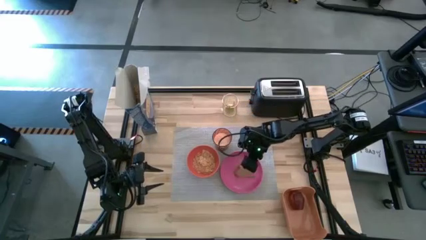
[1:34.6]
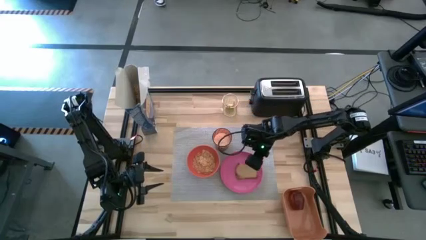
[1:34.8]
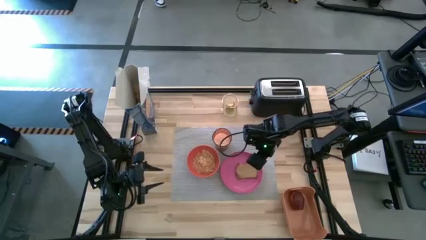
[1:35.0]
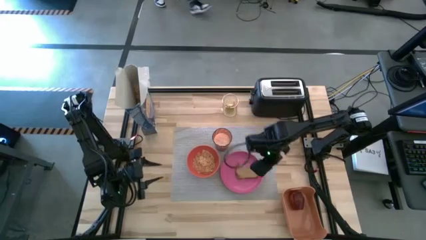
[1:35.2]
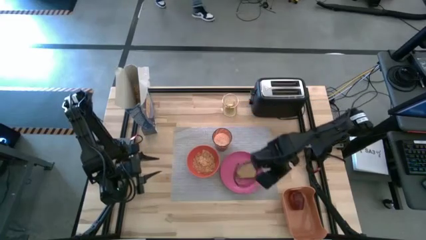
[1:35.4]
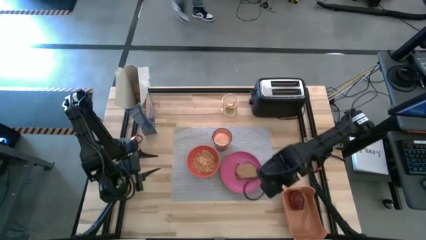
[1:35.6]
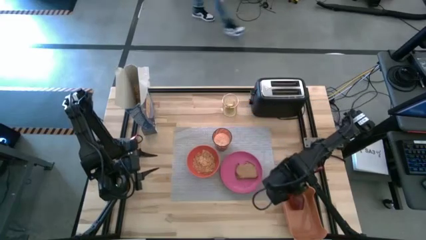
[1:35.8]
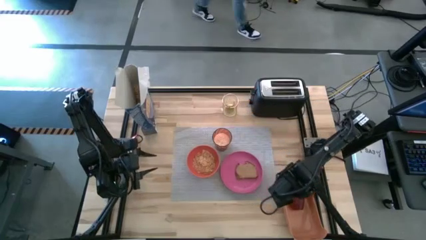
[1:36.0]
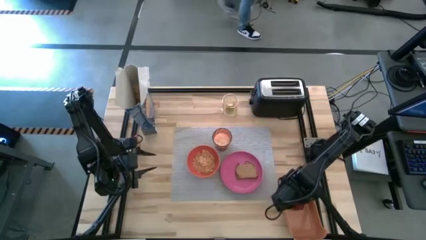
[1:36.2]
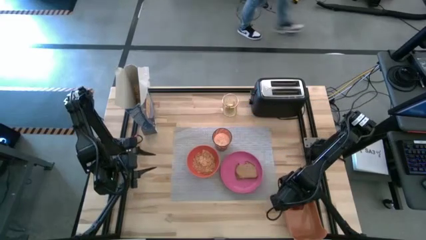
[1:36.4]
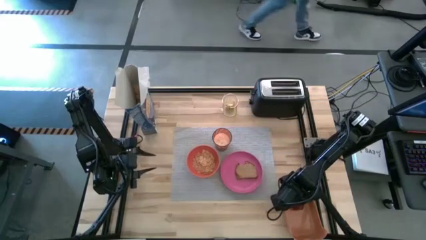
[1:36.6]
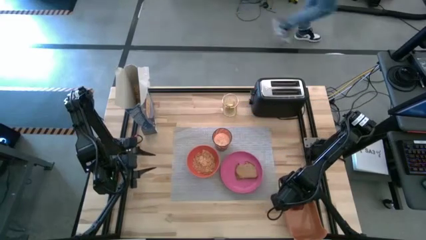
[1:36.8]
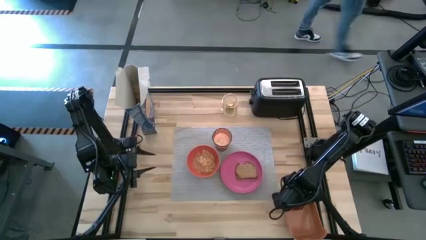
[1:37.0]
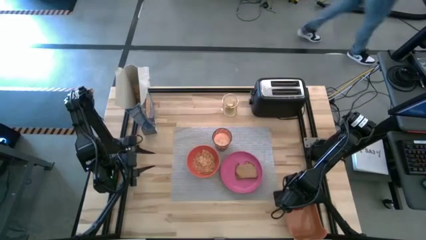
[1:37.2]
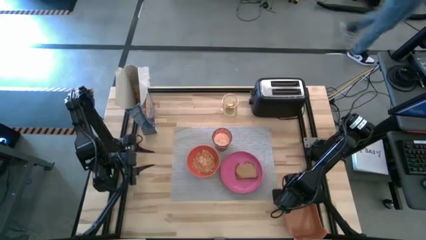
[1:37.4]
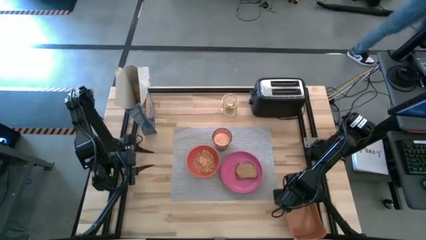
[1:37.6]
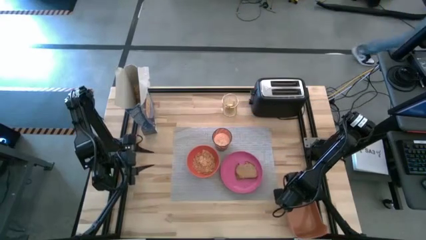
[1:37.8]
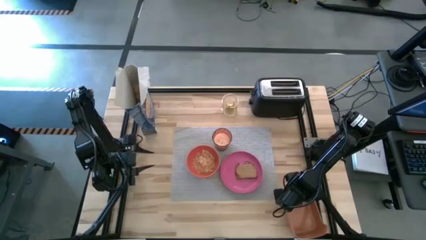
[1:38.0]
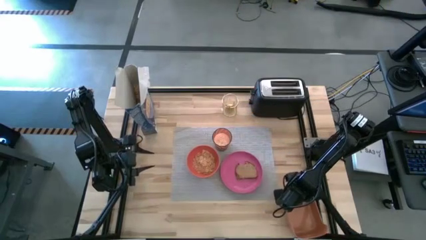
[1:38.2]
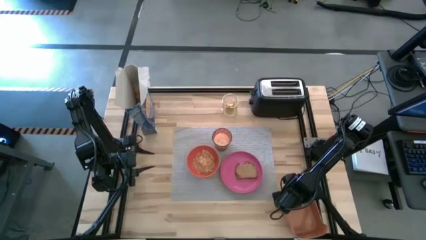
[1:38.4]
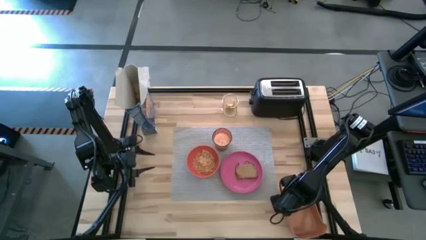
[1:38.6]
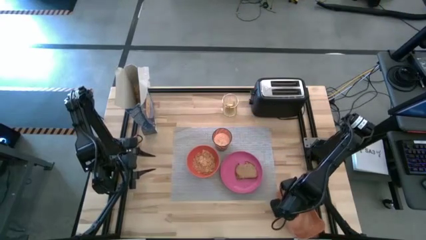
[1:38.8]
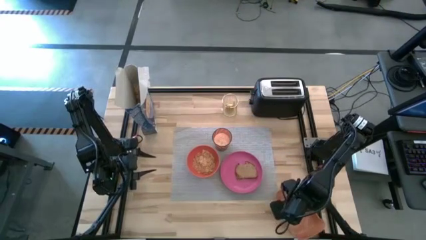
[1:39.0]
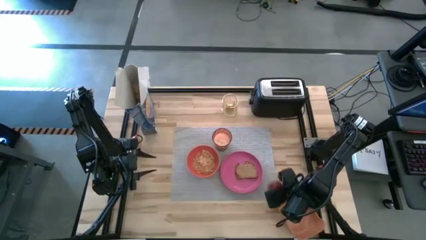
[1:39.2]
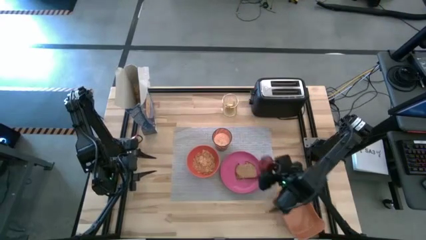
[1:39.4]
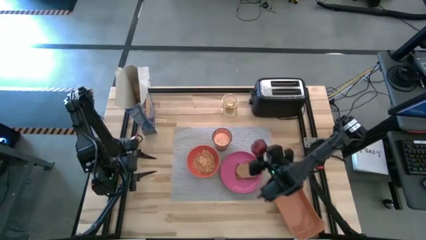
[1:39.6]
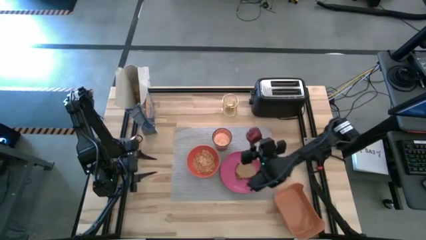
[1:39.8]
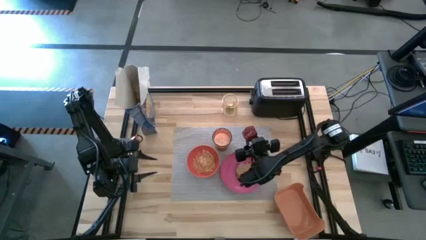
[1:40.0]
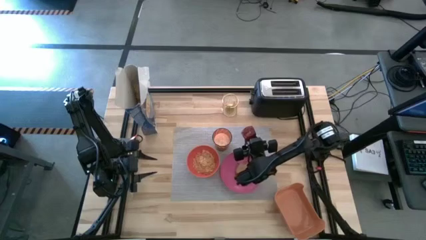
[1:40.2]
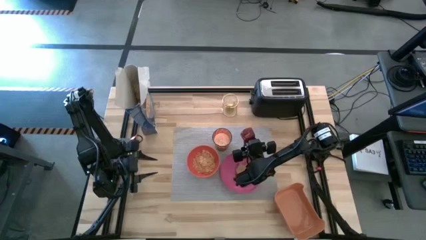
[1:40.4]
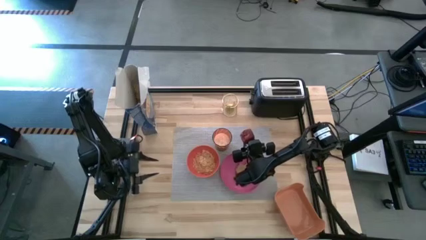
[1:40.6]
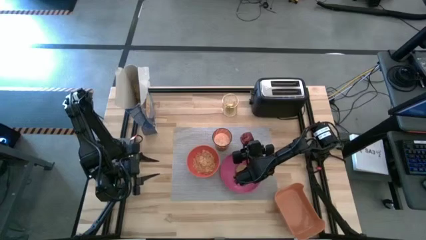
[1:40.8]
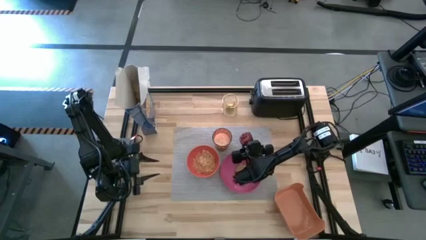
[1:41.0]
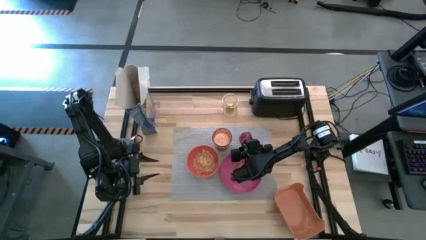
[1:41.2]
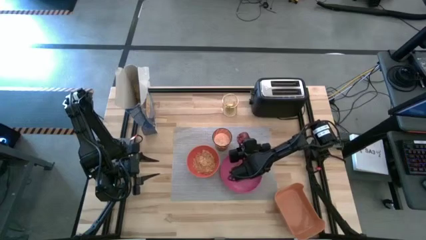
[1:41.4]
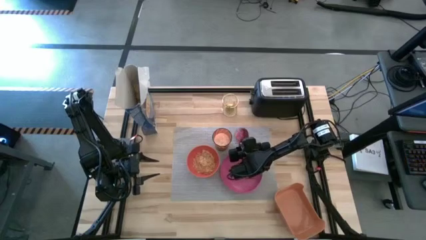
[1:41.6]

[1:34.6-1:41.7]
Task: Arrange a breakfast setting
Put the red apple on the grey tablemat to the top of the pink plate

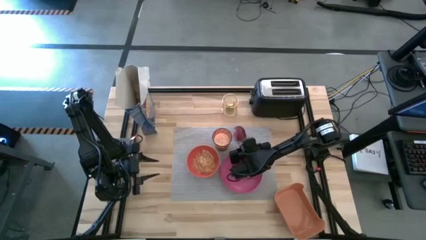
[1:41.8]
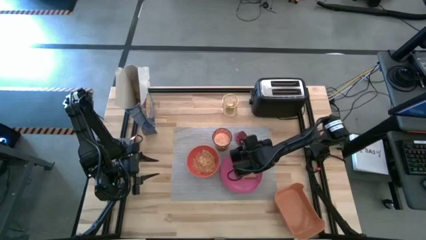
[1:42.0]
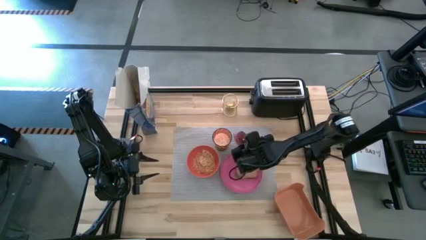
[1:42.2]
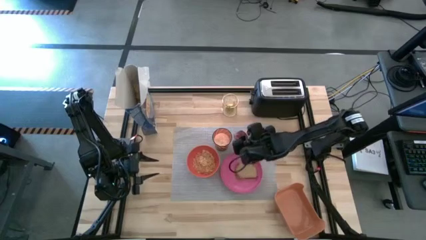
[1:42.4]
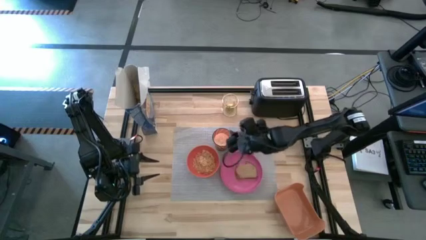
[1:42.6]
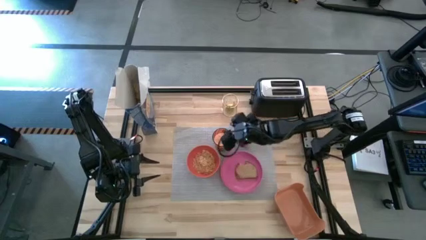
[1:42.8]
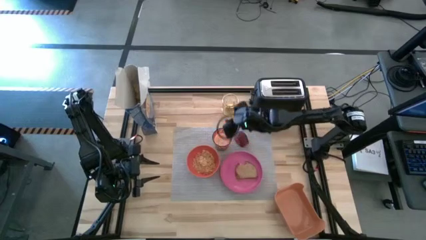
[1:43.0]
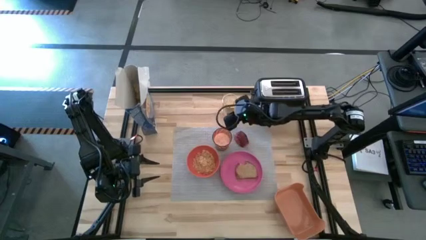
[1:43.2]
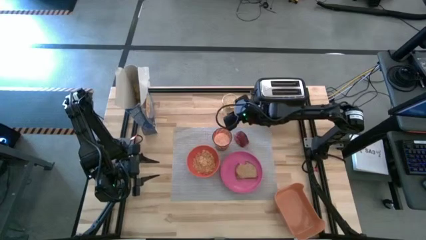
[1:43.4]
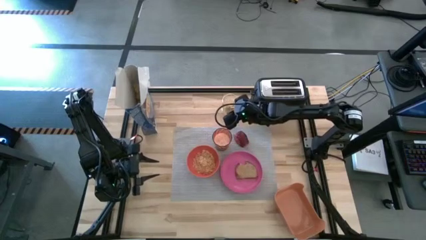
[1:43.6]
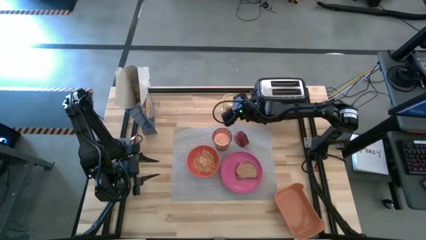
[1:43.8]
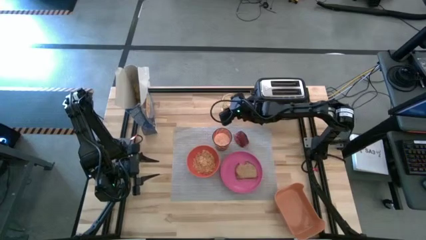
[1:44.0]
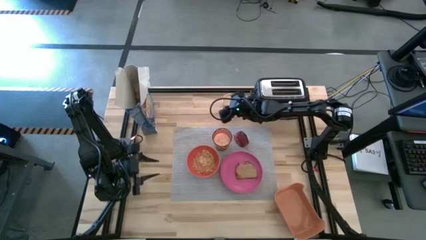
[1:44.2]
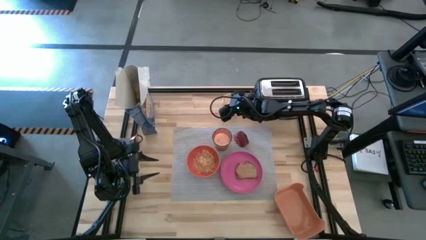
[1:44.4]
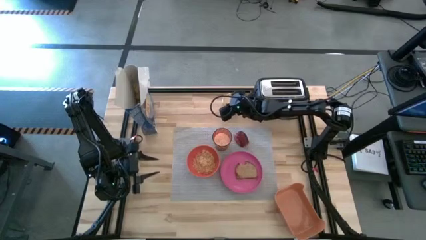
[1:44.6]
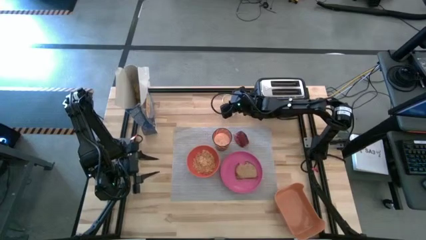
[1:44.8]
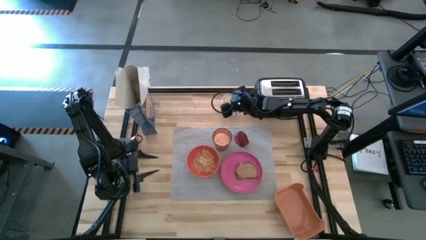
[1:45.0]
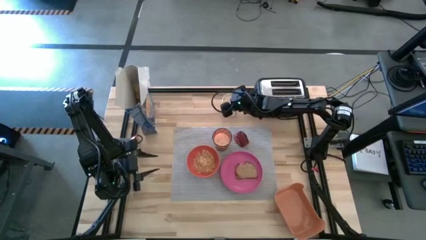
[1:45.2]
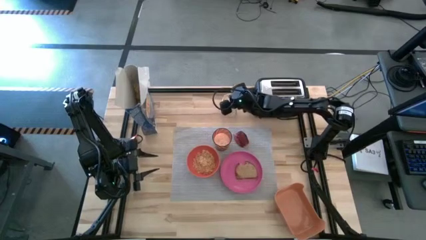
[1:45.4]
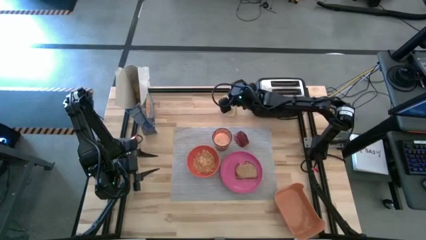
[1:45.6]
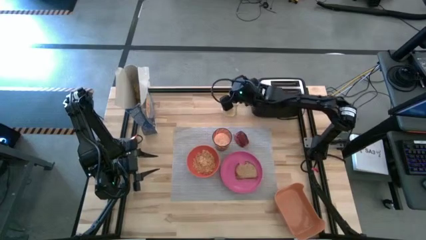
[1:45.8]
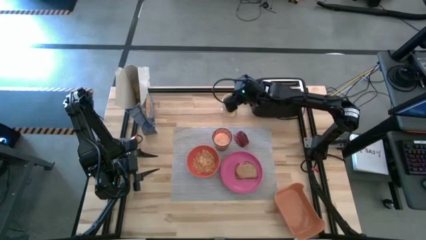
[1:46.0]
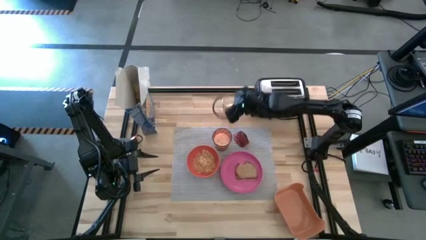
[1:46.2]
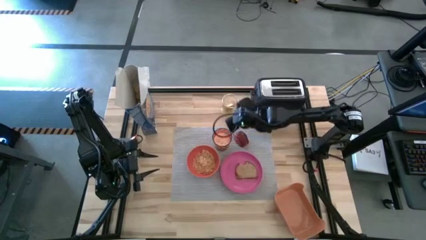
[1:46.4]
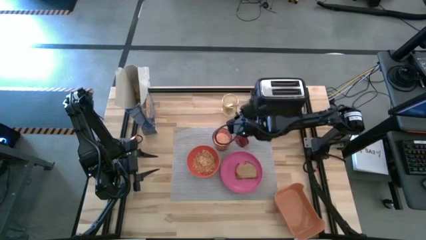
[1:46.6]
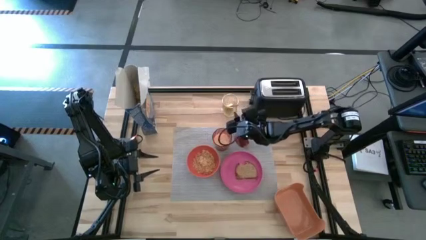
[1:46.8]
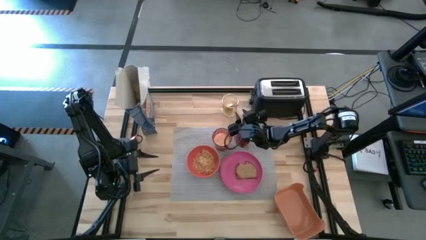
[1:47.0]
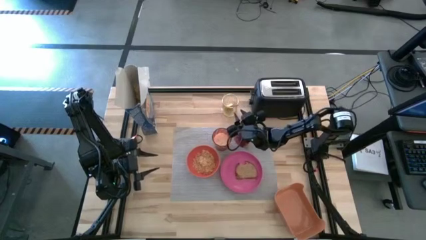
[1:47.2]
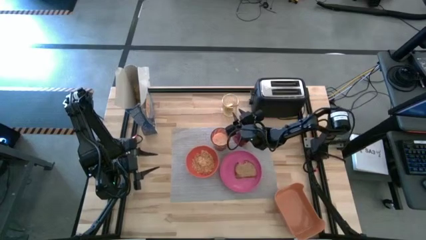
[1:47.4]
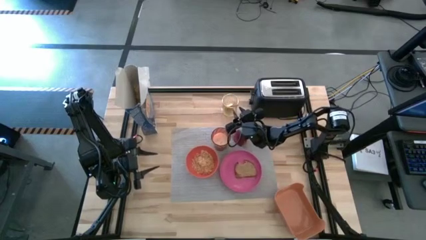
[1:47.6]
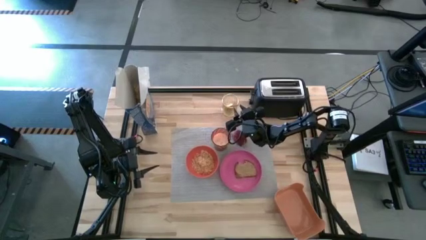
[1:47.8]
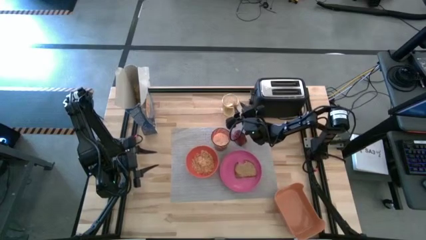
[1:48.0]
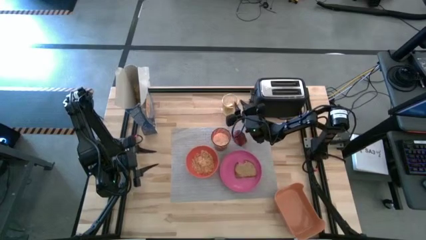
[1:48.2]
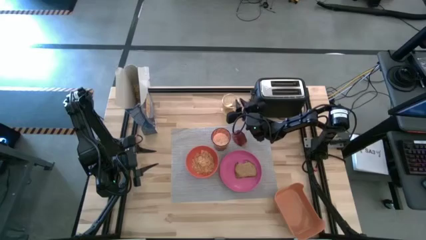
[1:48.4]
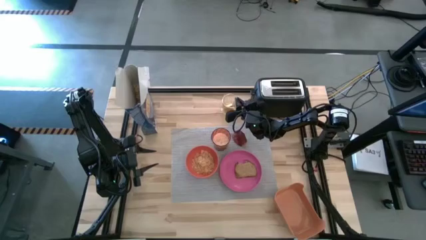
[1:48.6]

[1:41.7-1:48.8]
Put the gold spoon on the grey tablemat to the left of the orange bowl
